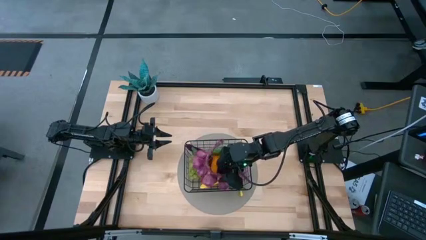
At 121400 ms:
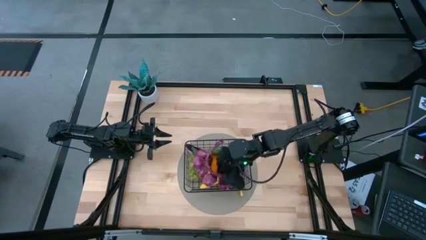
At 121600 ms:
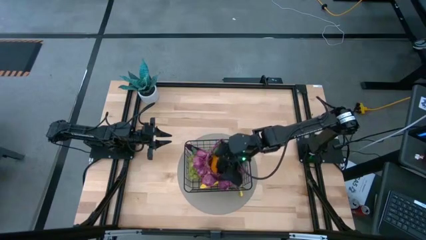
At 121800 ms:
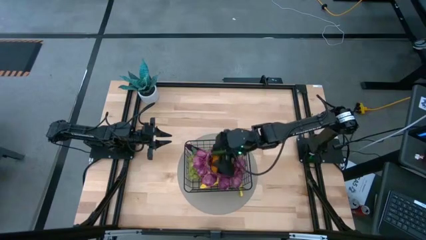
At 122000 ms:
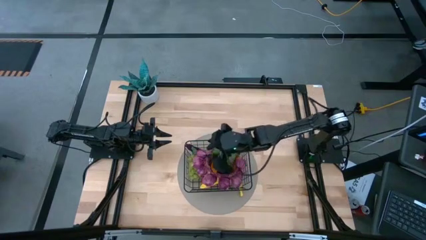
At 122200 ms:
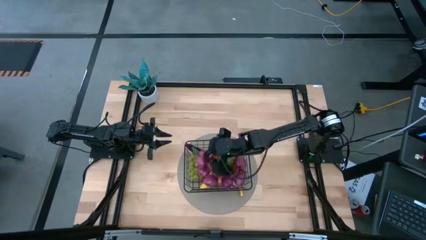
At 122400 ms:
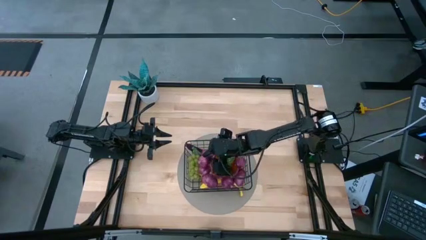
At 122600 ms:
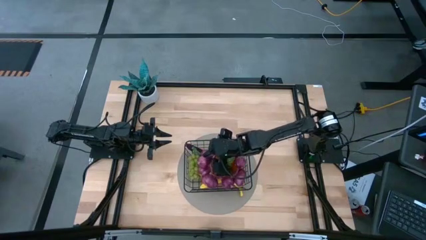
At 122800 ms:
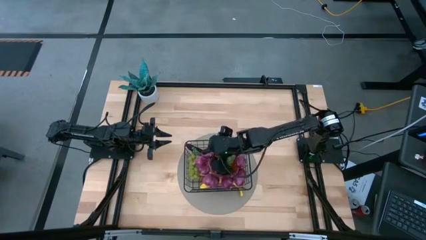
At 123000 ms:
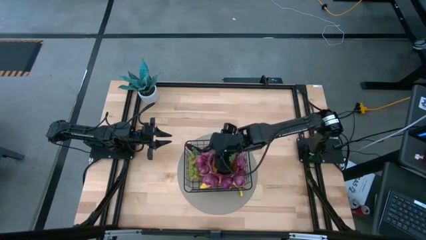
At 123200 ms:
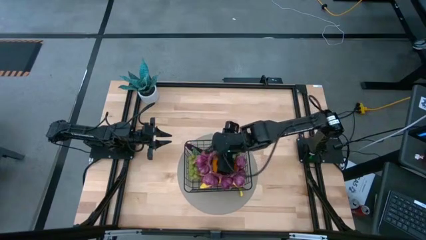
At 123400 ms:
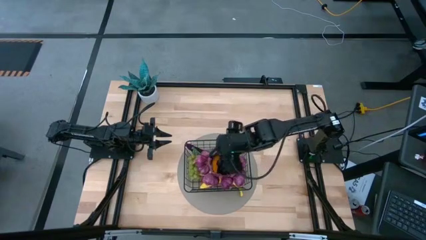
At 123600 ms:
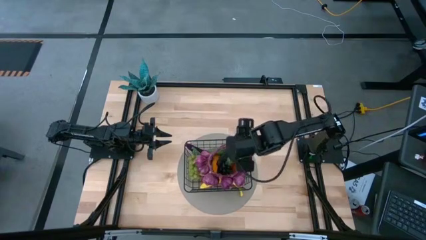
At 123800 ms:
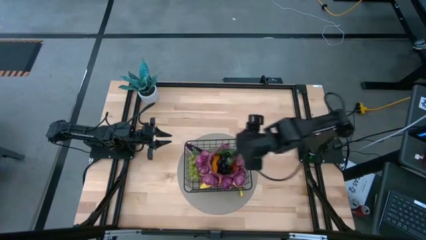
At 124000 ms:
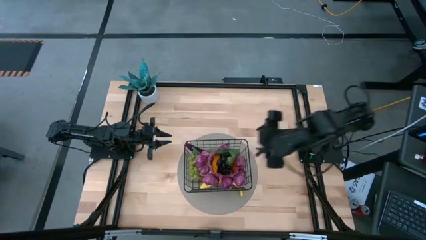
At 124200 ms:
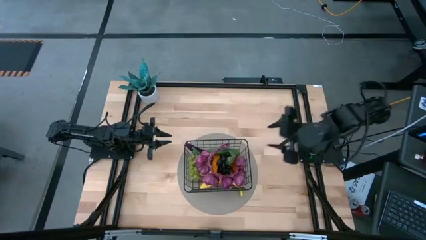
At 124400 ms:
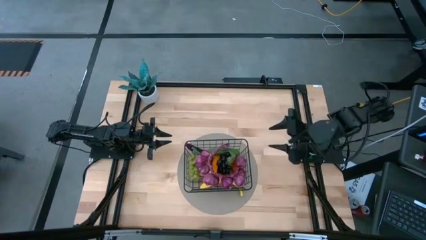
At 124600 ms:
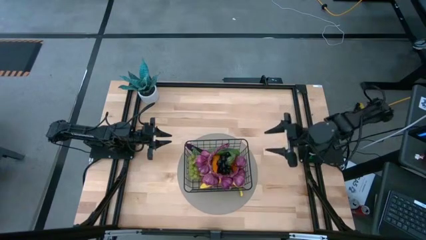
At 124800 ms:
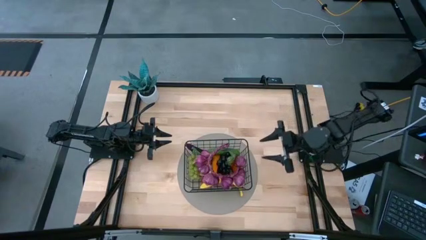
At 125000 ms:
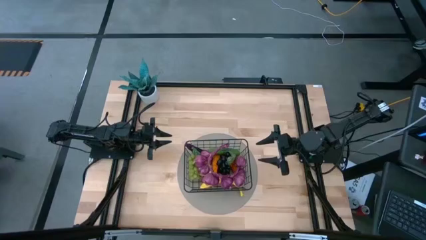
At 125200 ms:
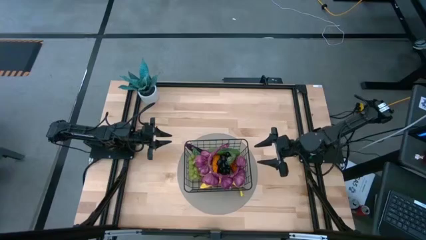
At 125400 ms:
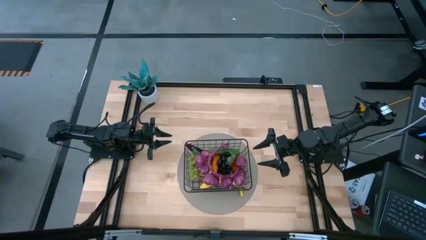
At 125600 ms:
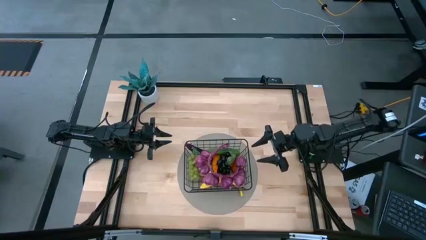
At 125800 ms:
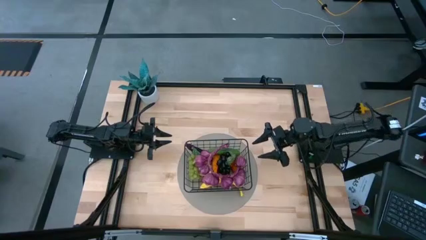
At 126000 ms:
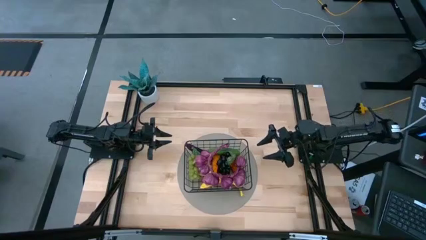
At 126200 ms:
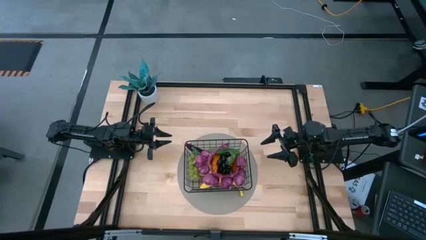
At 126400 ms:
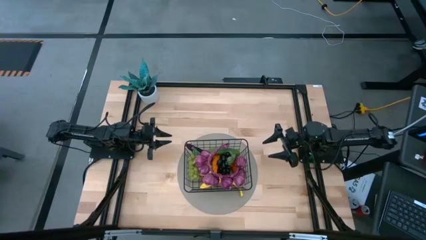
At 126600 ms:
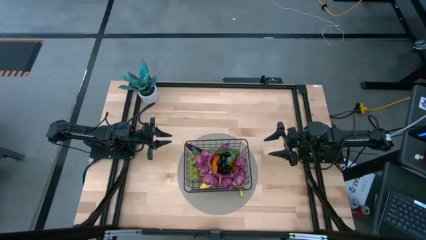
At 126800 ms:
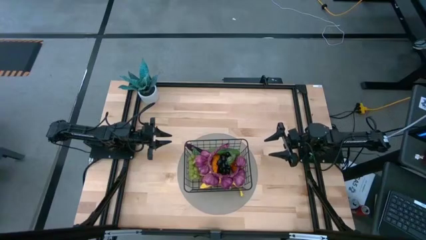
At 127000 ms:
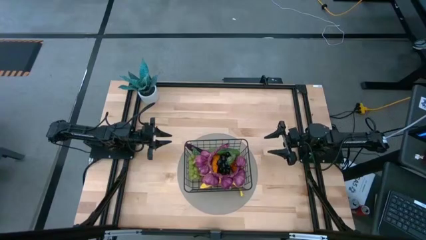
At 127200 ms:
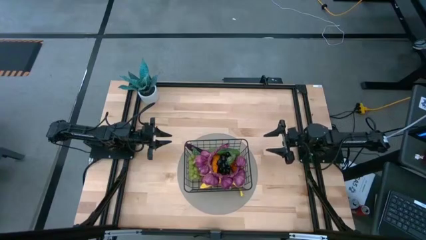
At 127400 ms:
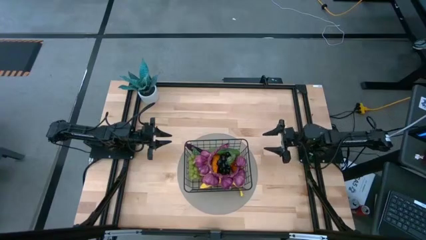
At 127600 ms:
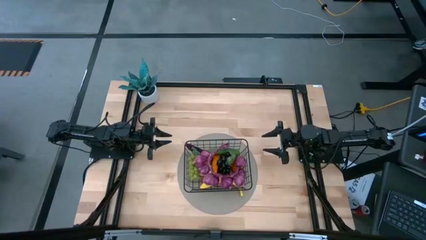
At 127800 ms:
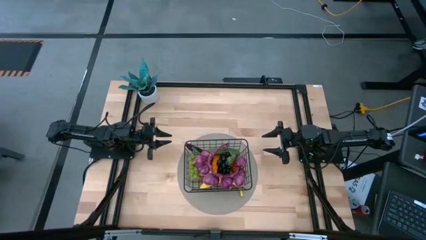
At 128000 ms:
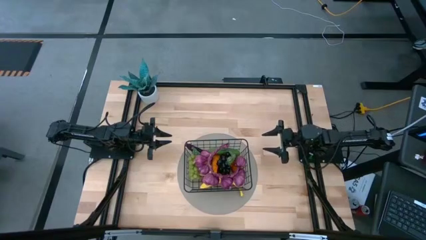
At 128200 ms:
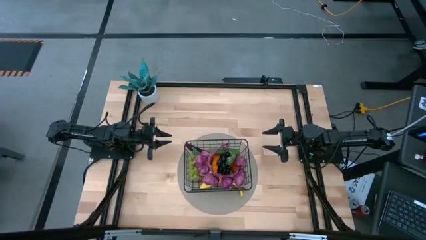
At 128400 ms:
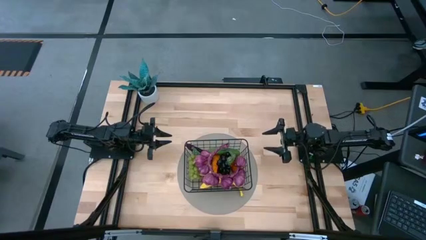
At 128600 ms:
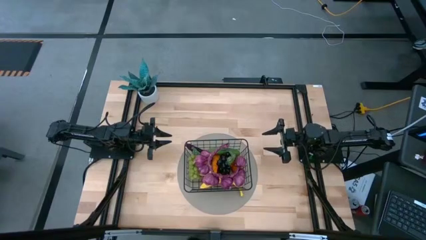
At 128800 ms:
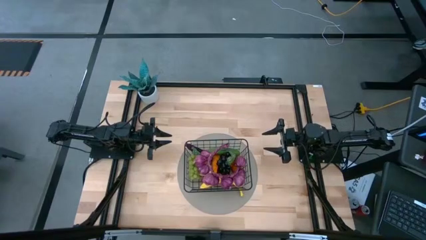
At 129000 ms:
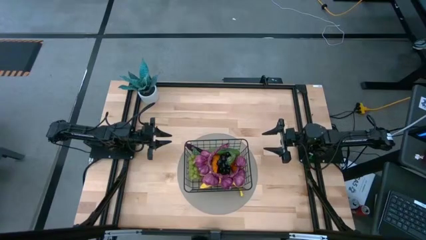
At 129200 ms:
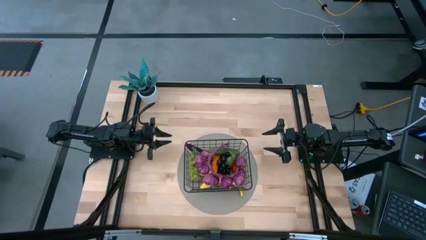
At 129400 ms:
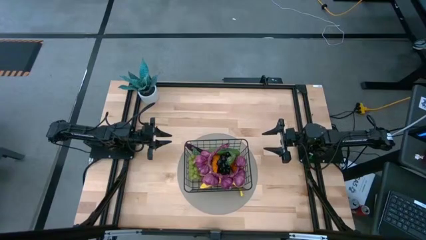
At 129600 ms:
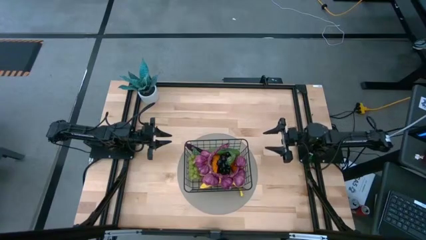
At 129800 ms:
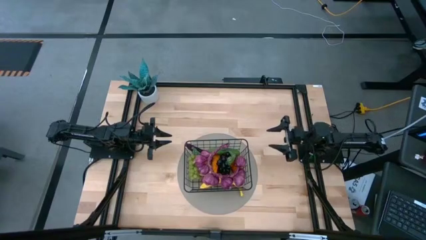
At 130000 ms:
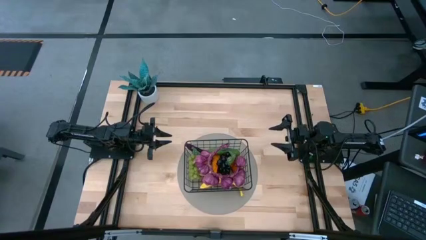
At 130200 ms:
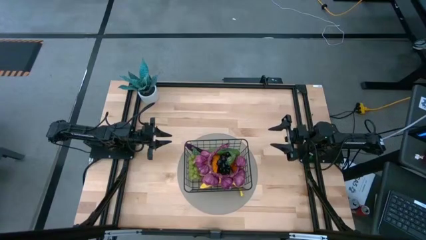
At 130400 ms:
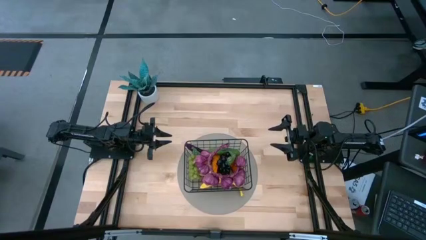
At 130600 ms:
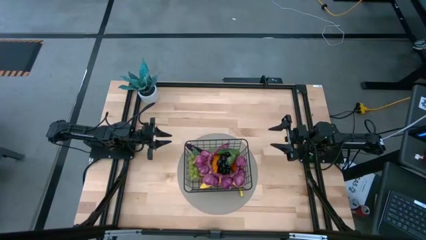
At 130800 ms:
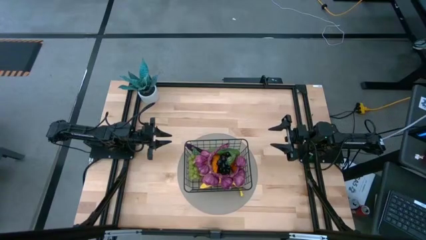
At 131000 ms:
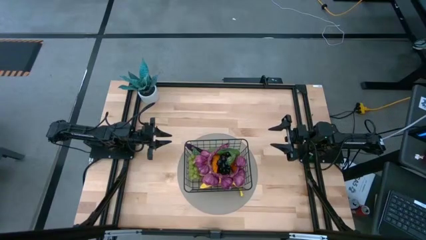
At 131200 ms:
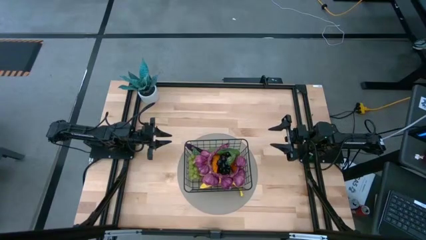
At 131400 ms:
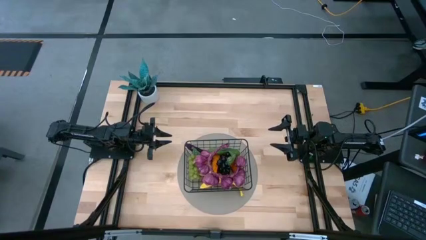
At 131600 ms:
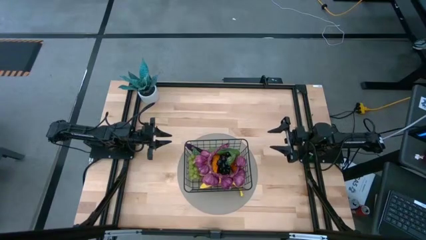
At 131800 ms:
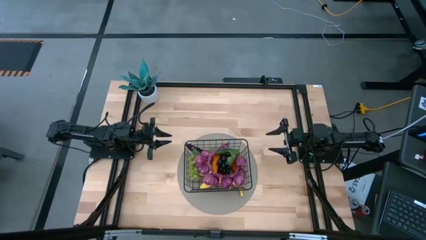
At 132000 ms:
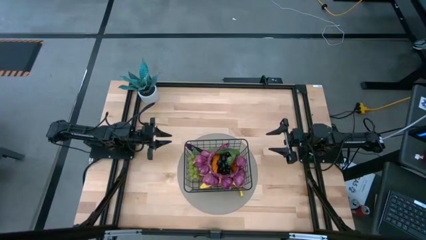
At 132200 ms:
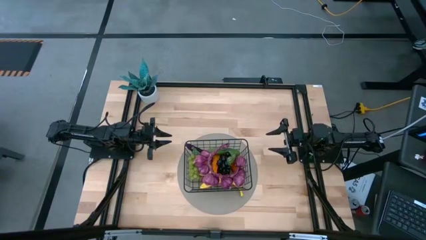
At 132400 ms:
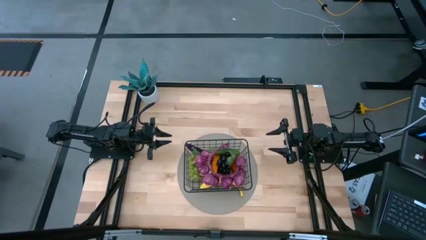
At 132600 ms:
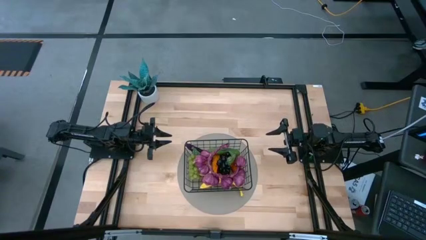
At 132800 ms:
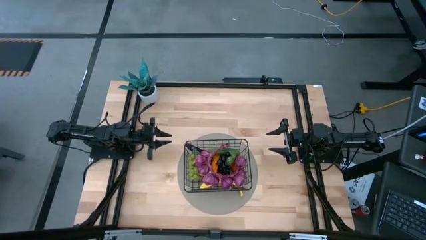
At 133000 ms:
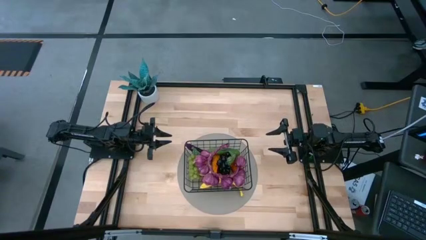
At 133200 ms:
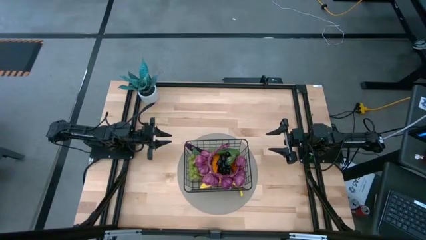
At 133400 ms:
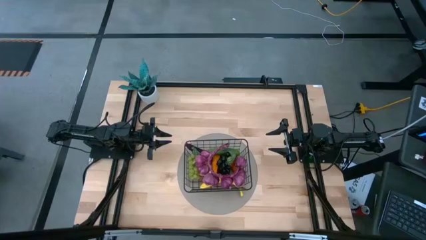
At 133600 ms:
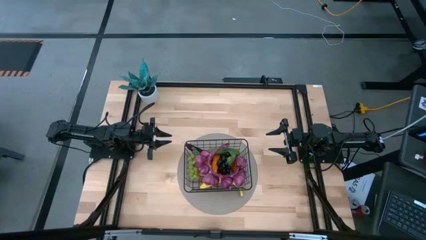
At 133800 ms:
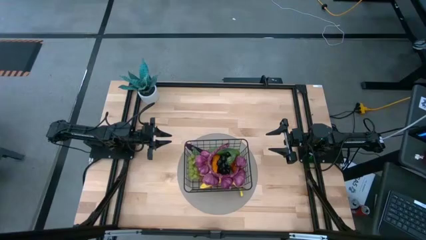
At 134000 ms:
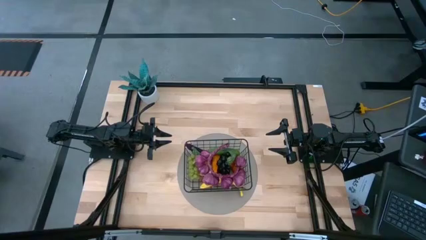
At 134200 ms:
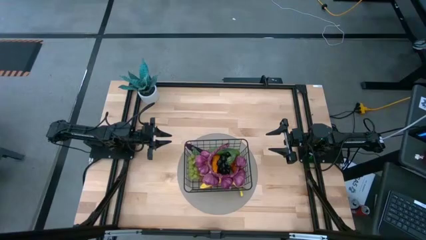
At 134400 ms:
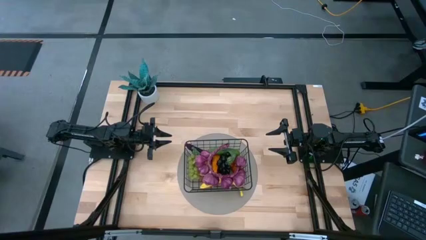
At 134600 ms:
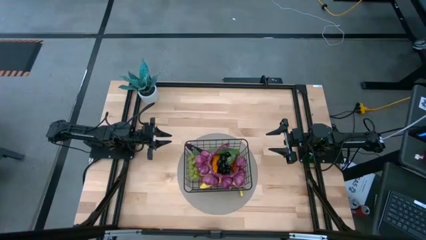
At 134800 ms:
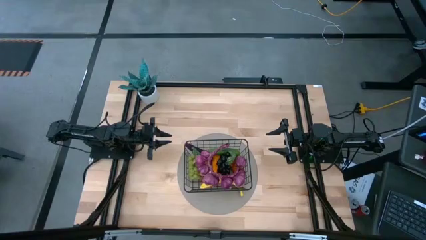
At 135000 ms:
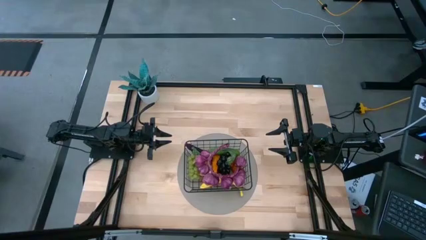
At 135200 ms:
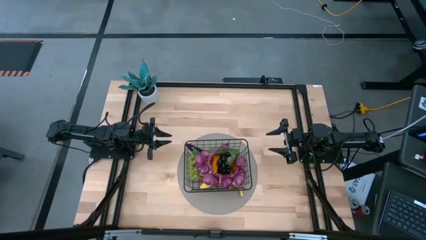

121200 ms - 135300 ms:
Task: Build produce basket
Return to Home Position
